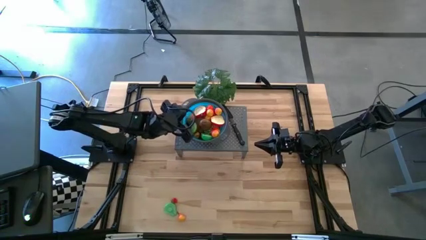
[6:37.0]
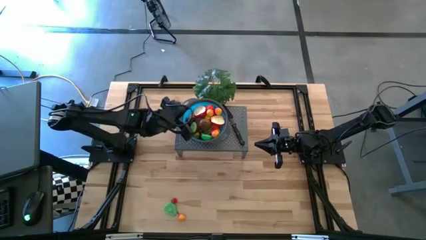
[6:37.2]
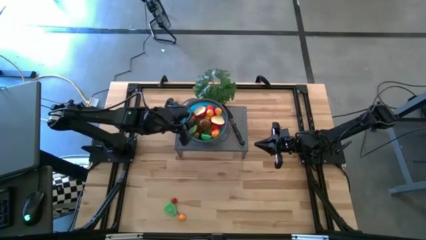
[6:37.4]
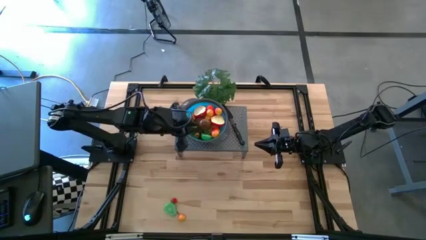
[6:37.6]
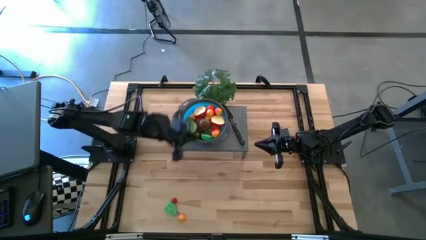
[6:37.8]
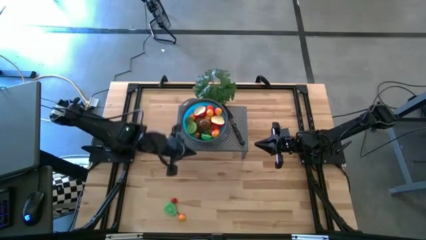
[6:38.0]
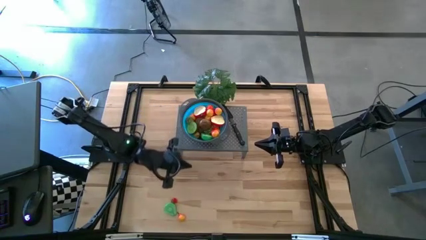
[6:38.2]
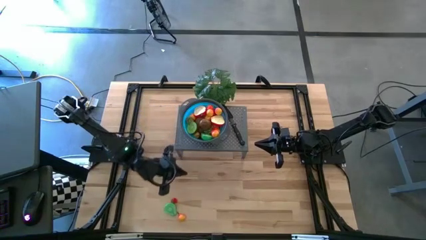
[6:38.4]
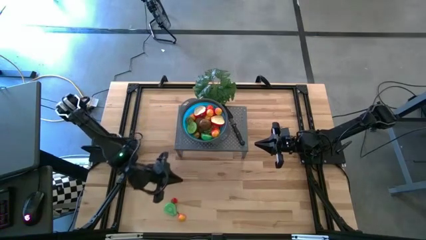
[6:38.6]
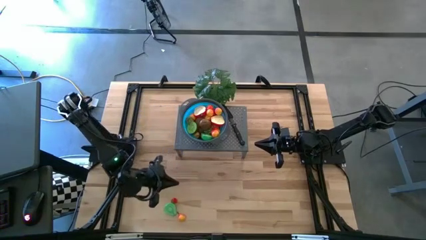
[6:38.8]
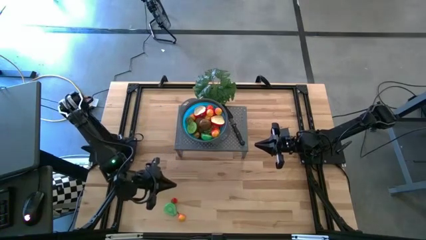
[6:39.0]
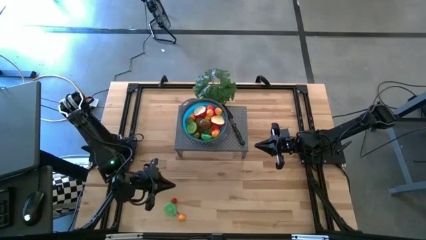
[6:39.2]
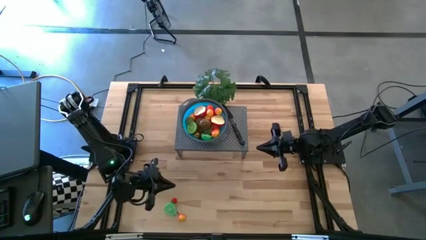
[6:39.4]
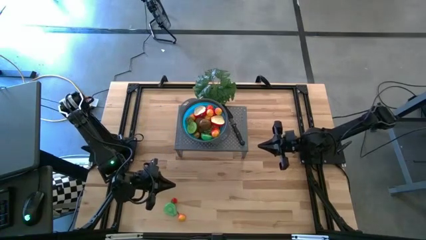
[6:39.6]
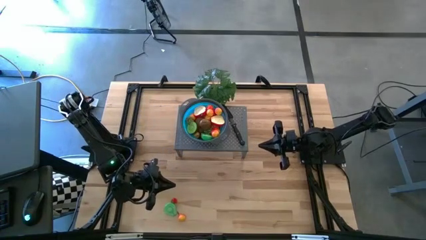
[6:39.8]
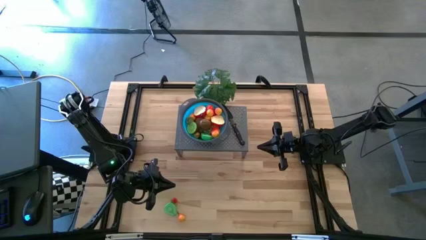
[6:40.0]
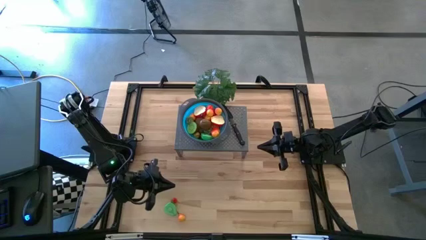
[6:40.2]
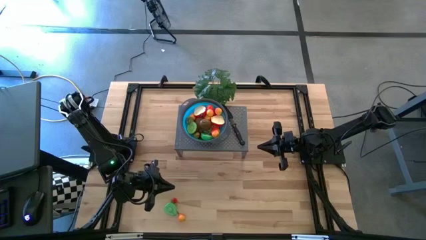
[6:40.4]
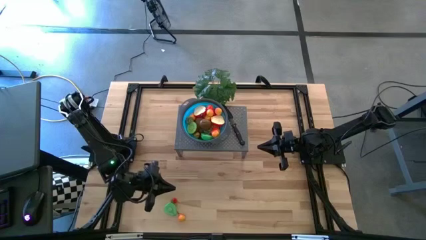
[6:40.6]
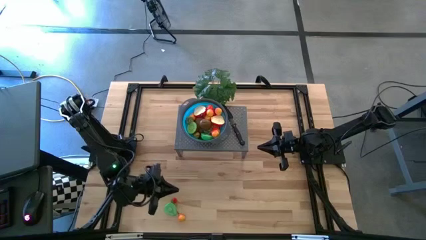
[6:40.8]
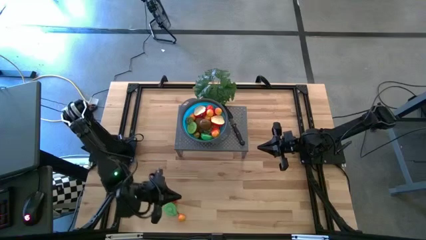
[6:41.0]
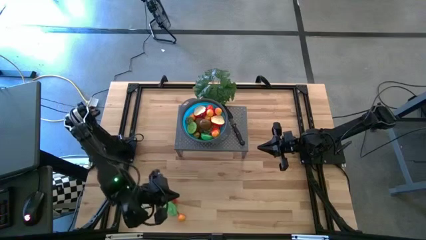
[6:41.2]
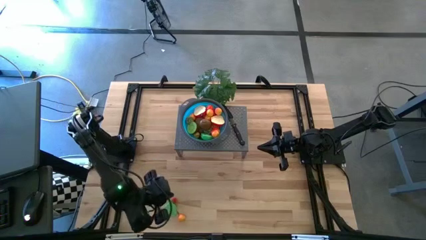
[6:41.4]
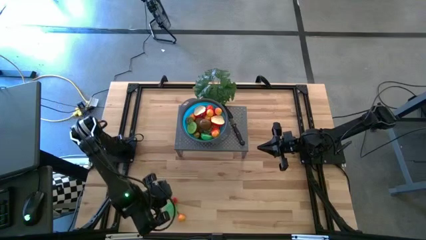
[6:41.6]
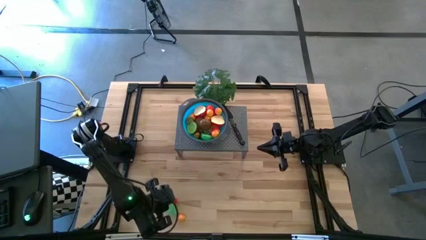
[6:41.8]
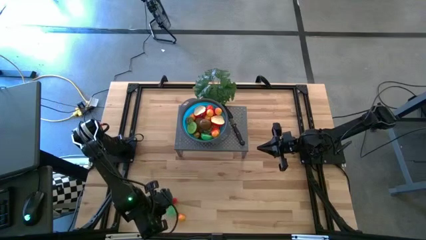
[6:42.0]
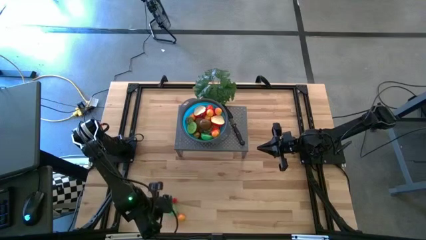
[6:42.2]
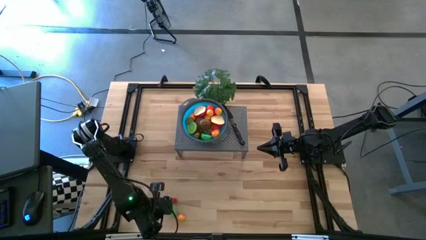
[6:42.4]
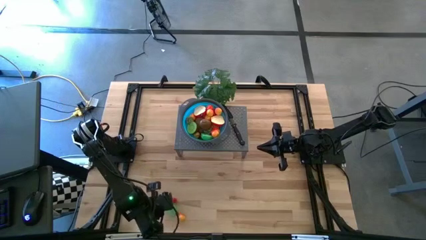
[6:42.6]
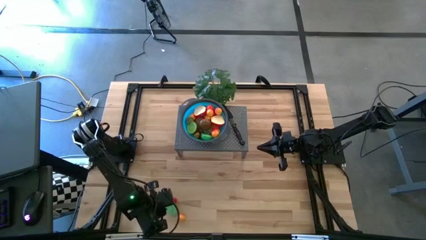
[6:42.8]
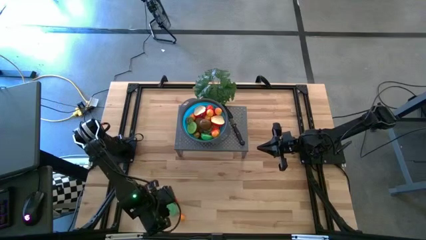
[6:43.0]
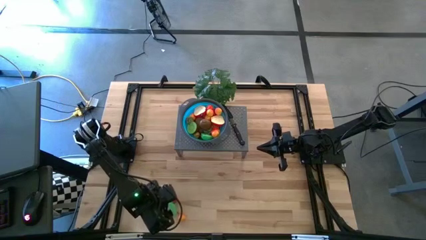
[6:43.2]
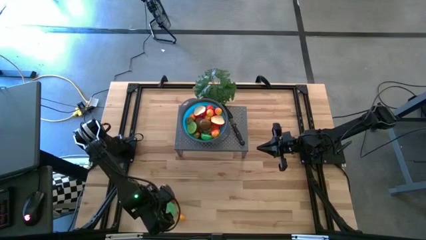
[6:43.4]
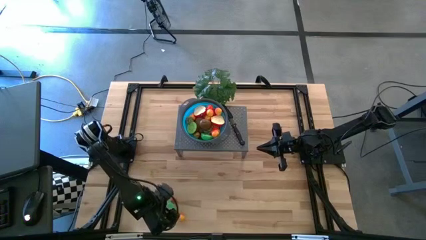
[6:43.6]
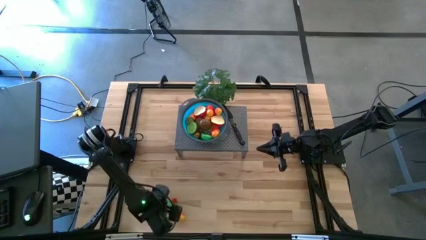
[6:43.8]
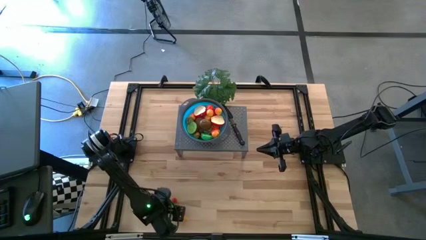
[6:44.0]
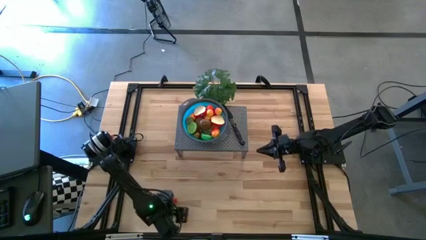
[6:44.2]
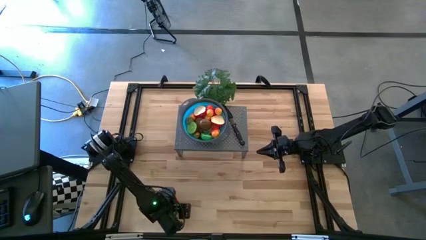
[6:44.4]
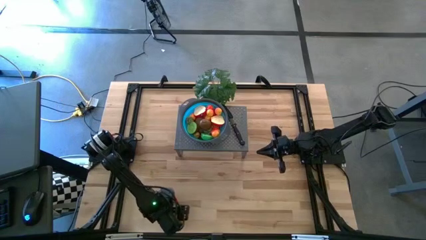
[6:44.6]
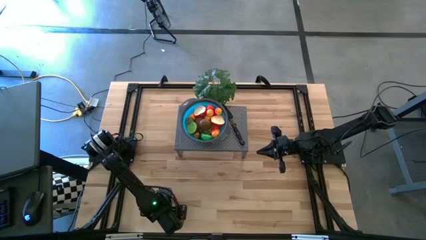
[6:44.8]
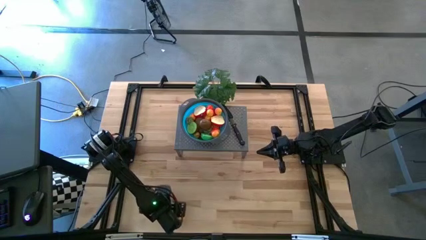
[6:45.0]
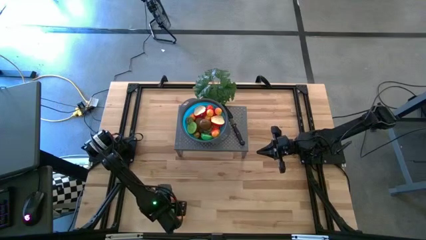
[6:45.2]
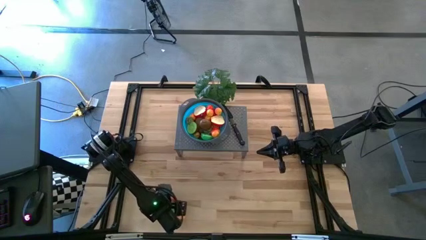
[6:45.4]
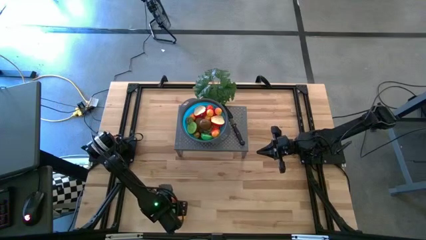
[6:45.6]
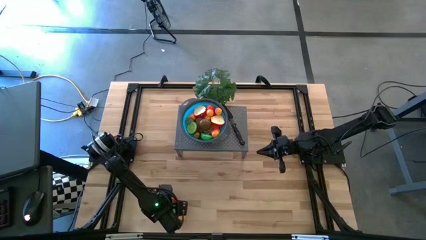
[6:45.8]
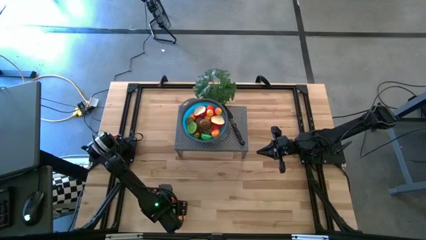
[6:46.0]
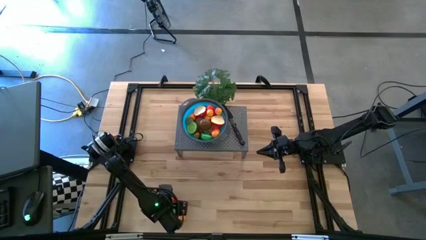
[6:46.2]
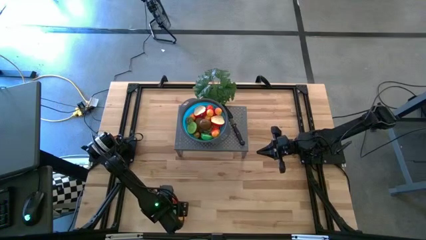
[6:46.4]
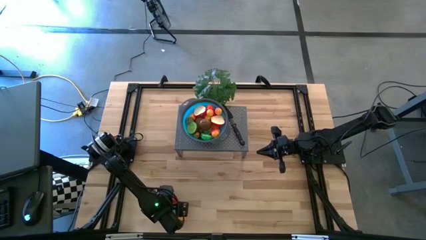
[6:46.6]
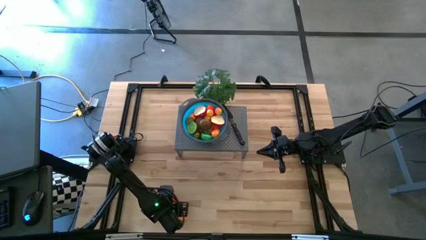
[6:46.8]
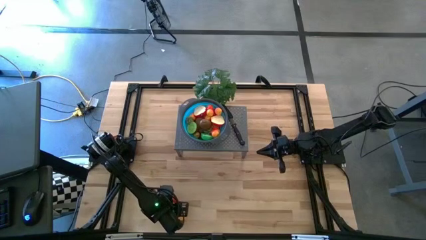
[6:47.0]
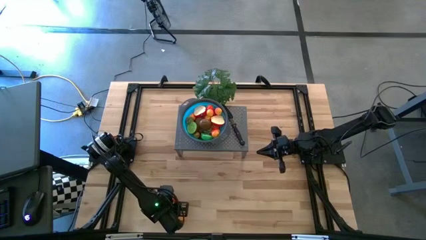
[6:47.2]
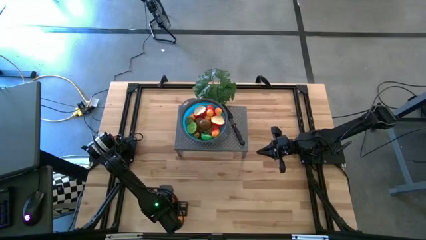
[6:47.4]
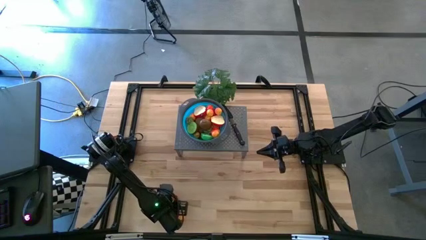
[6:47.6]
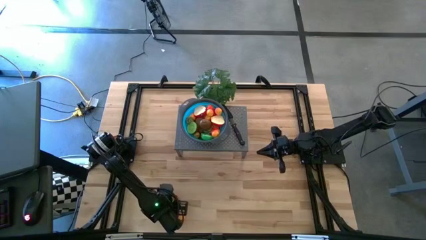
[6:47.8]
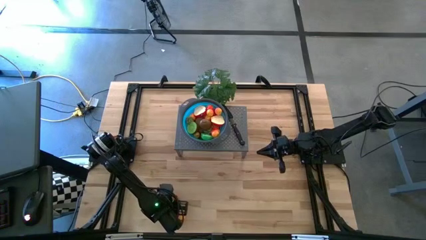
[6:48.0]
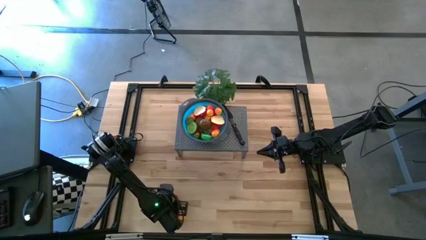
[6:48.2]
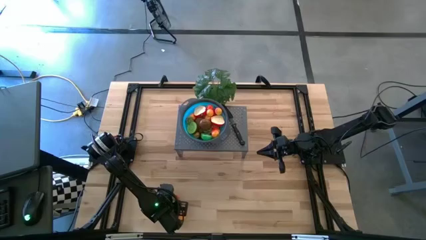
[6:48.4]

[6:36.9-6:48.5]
Task: Pick & Place Fruit
Put the pear into the blue strainer bowl on the shelf

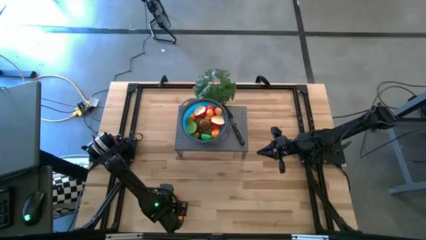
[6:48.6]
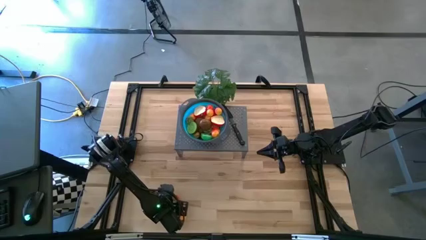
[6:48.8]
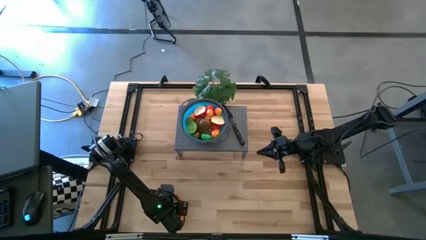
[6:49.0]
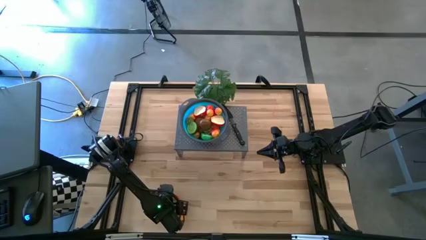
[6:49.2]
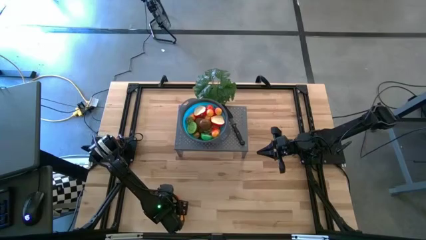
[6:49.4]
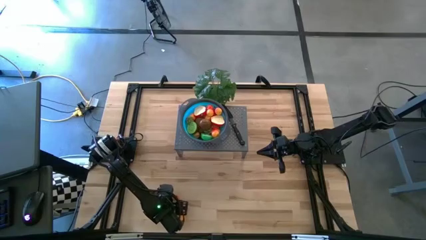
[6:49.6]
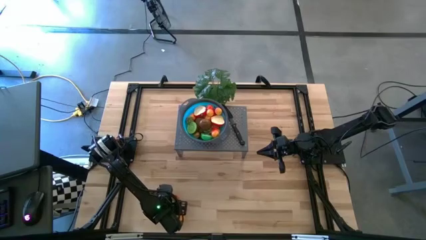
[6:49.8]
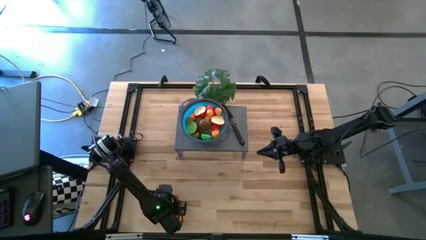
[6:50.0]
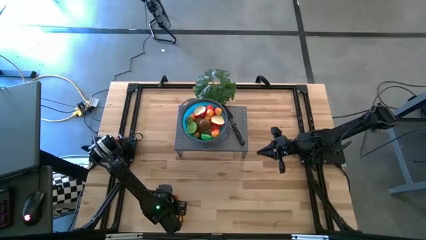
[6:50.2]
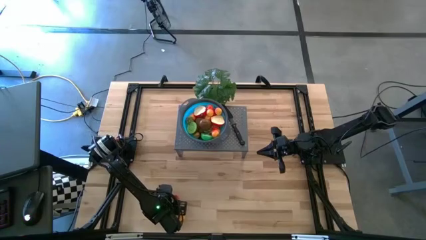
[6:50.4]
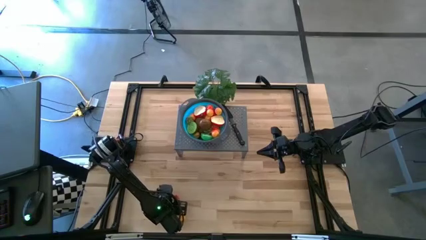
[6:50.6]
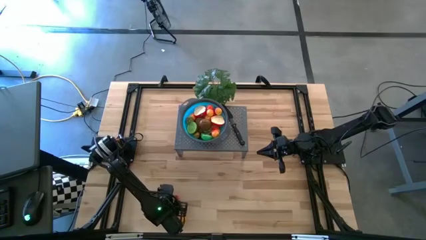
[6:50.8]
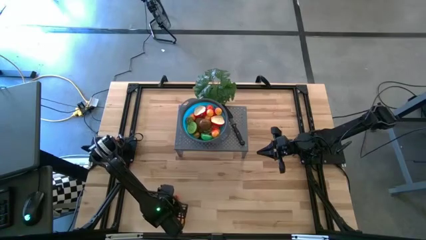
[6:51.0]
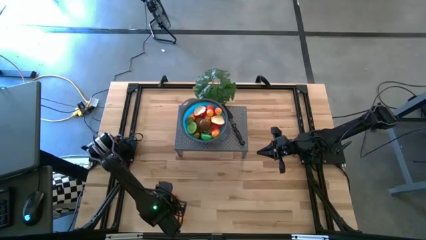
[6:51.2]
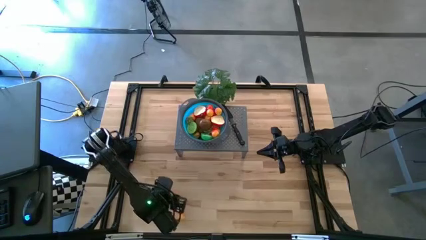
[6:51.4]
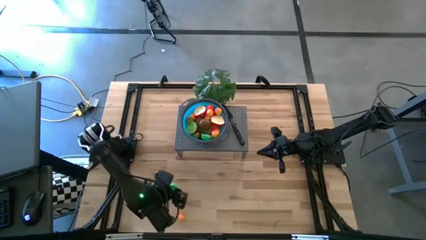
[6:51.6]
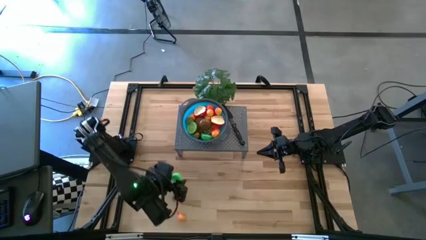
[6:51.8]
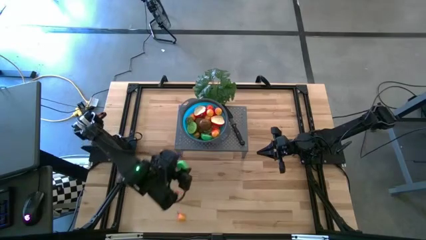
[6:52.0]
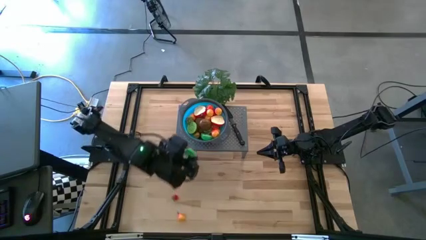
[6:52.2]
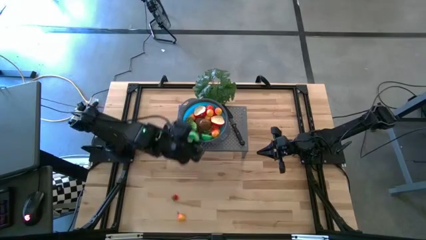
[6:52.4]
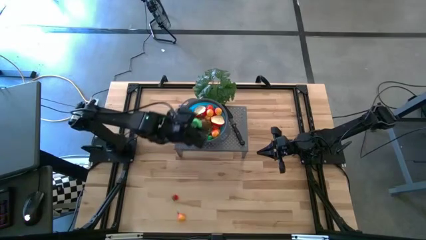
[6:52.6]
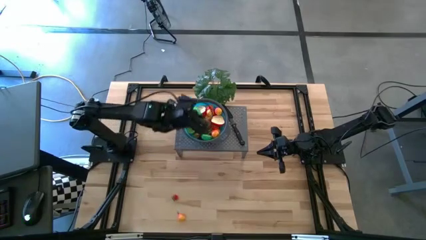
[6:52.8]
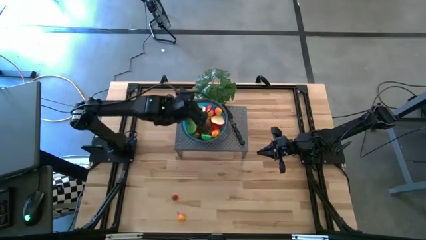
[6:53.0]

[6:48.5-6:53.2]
Put the avocado into the blue strainer bowl on the shelf
